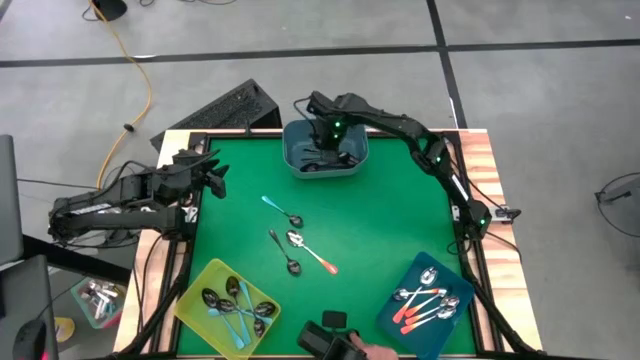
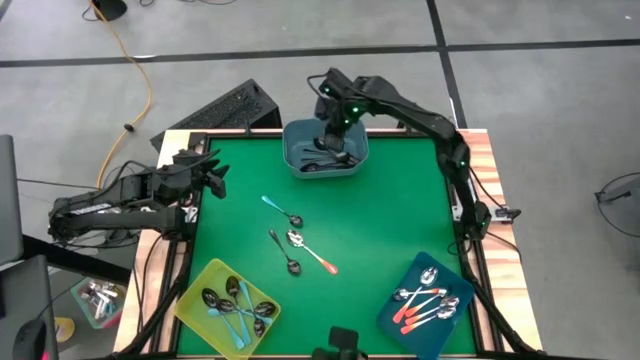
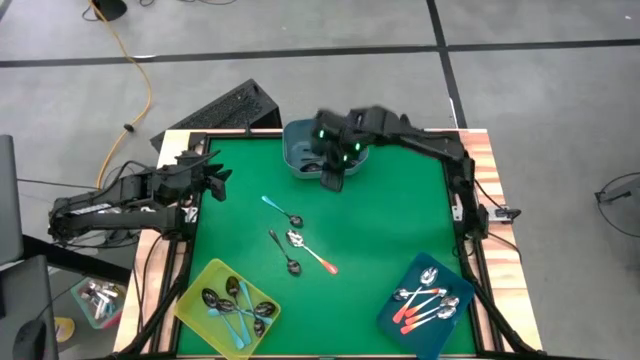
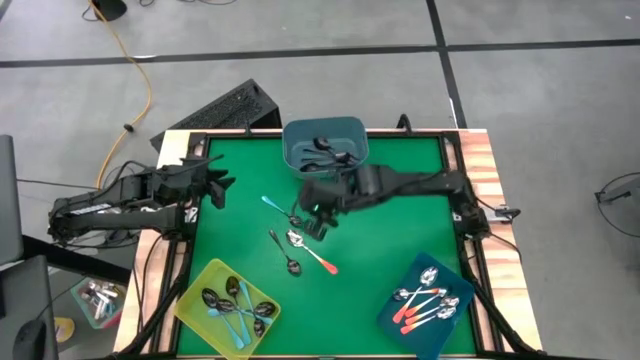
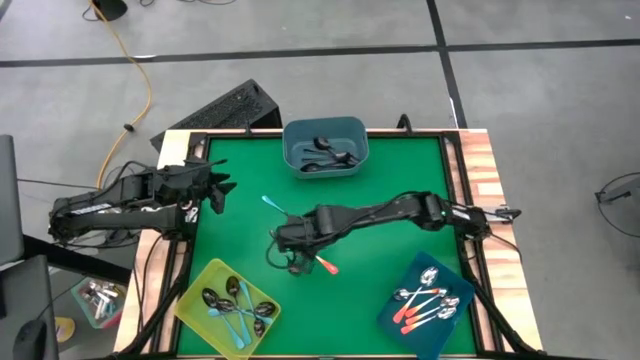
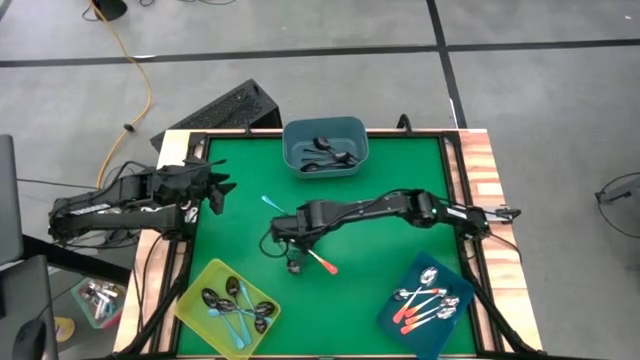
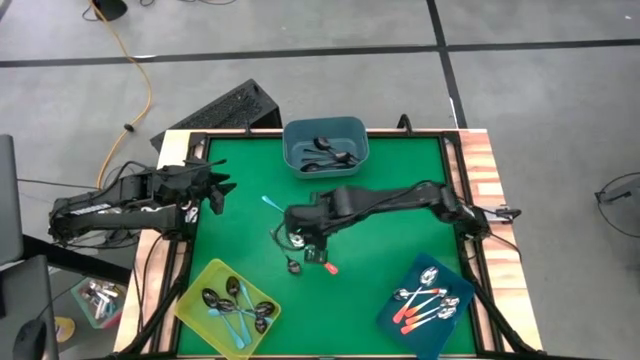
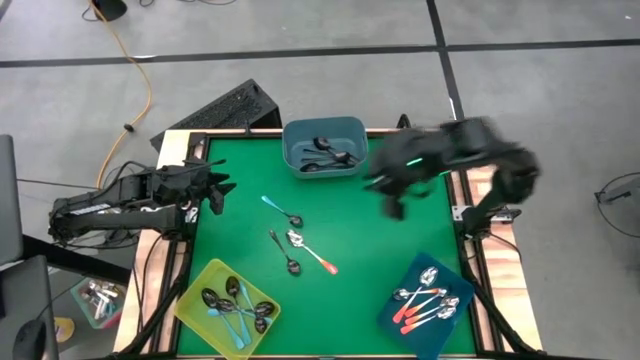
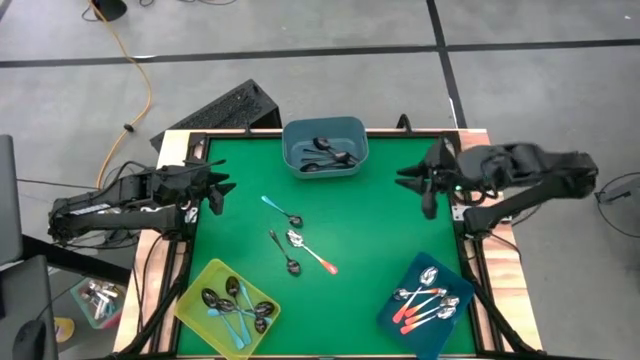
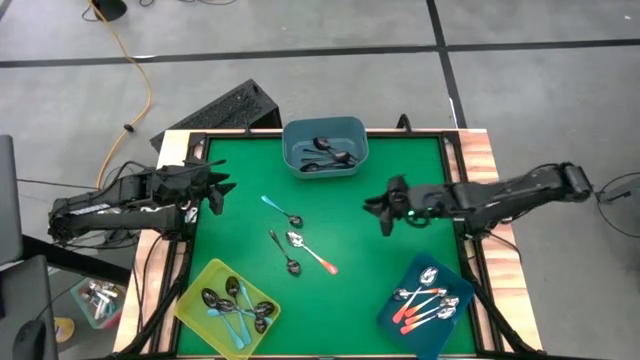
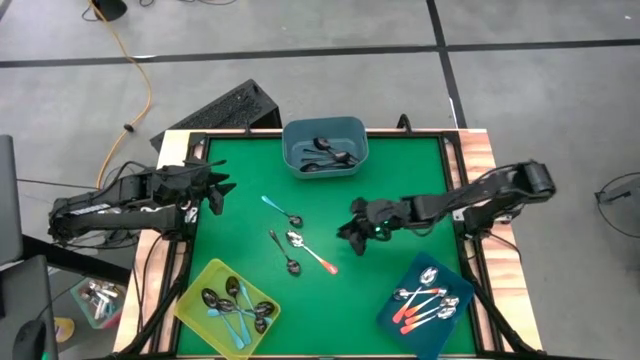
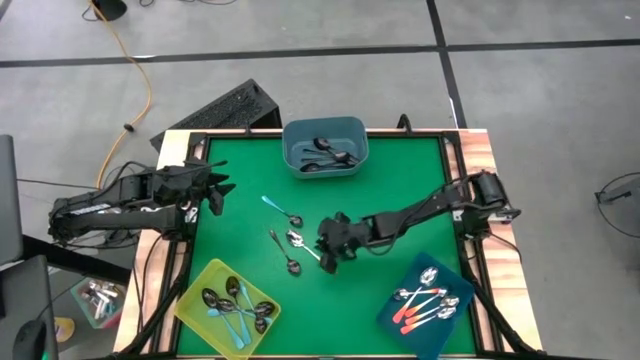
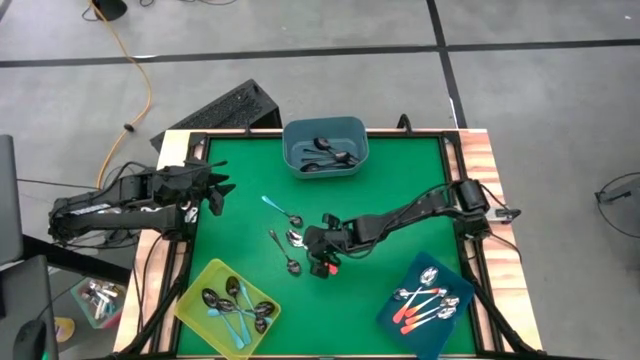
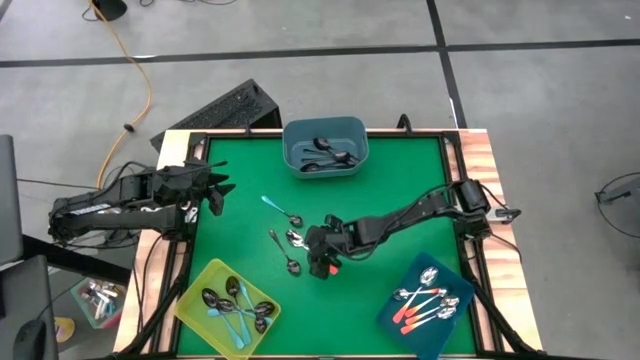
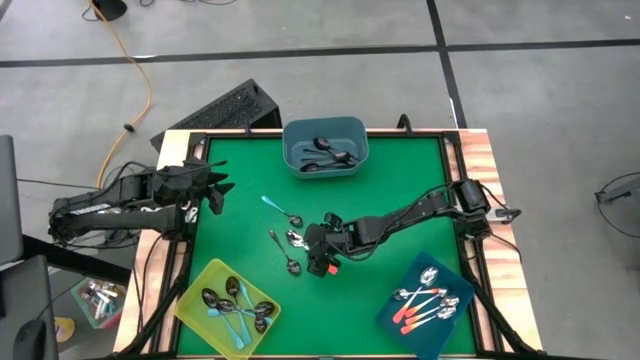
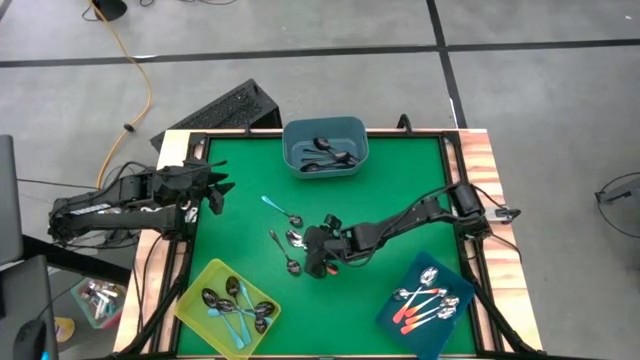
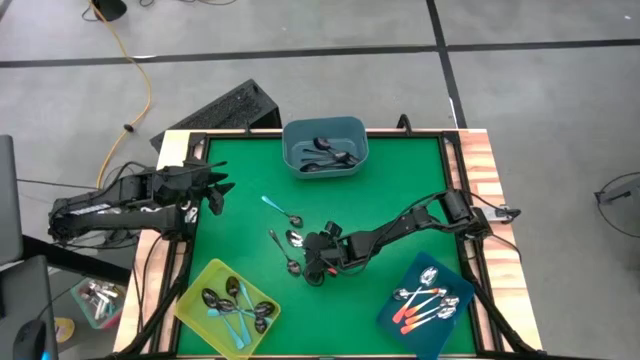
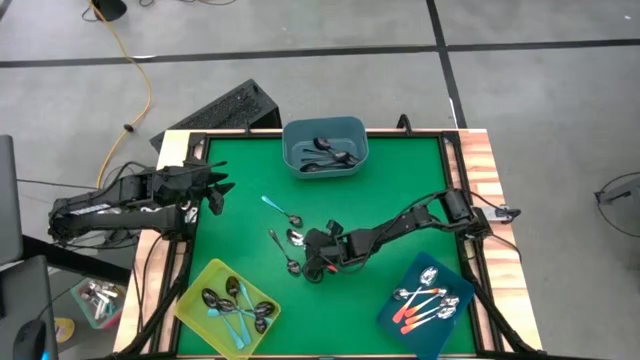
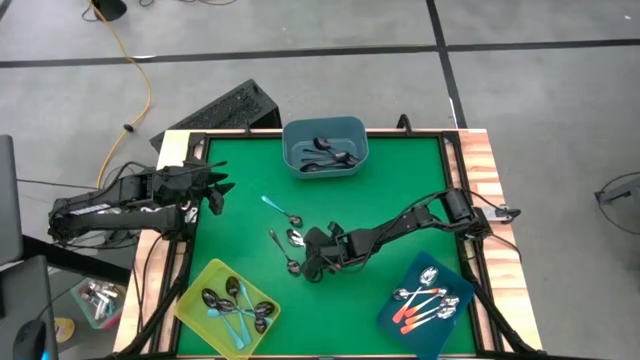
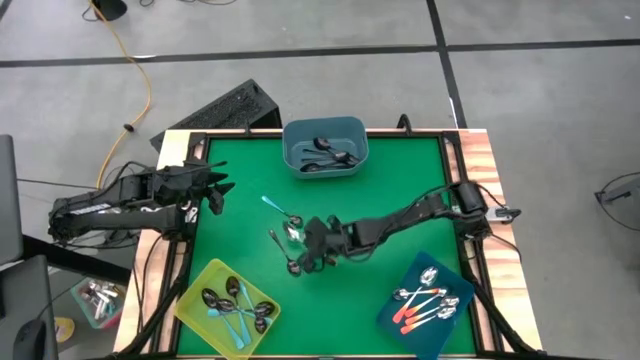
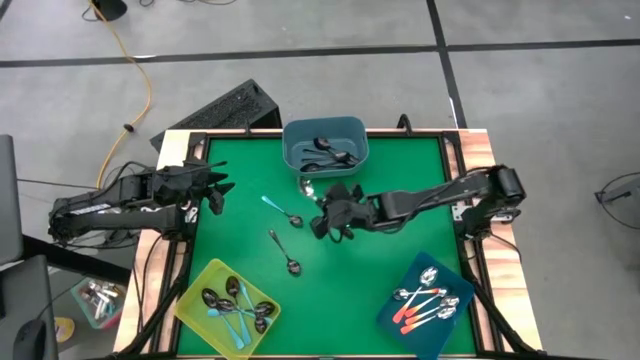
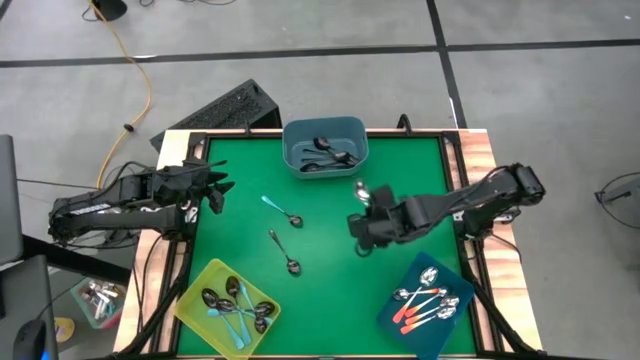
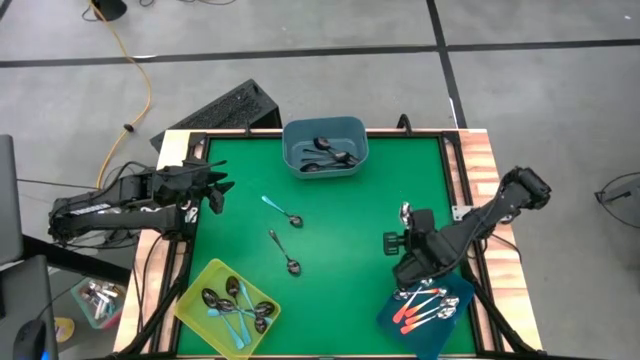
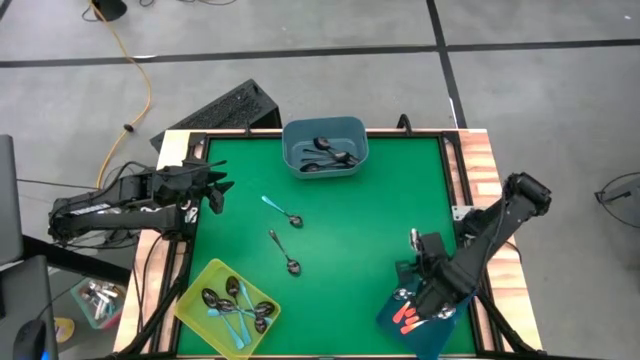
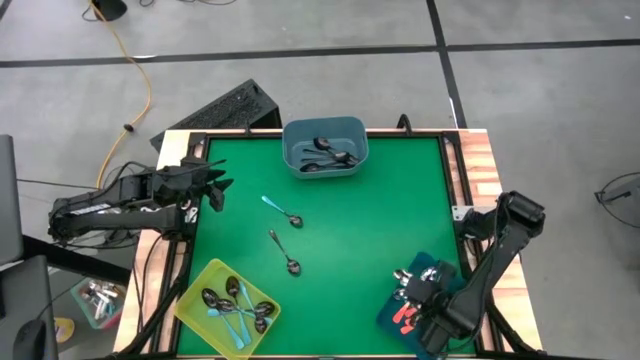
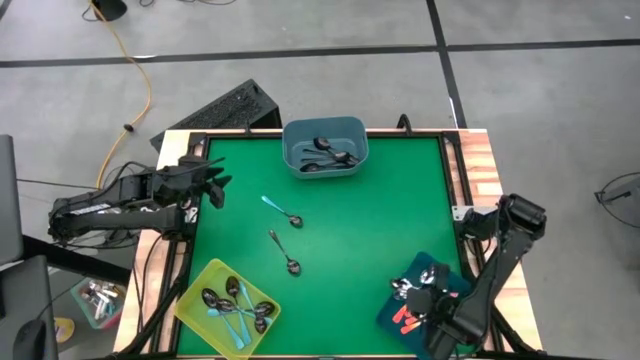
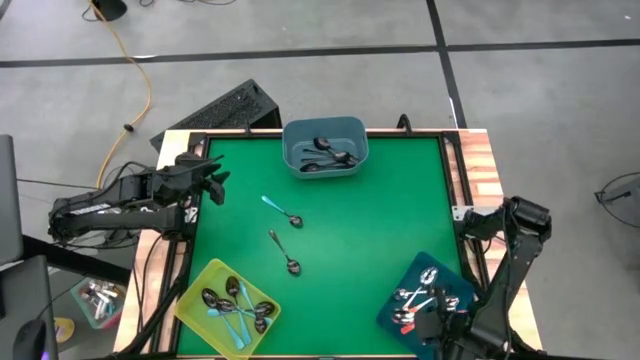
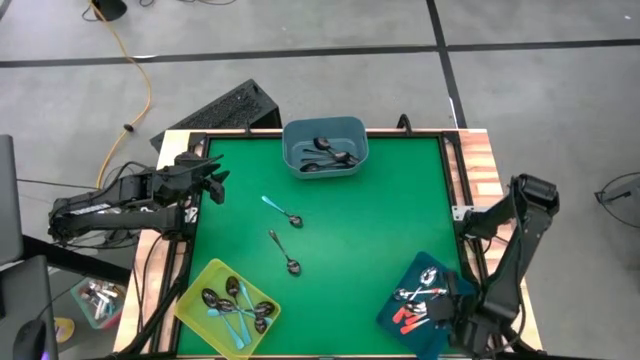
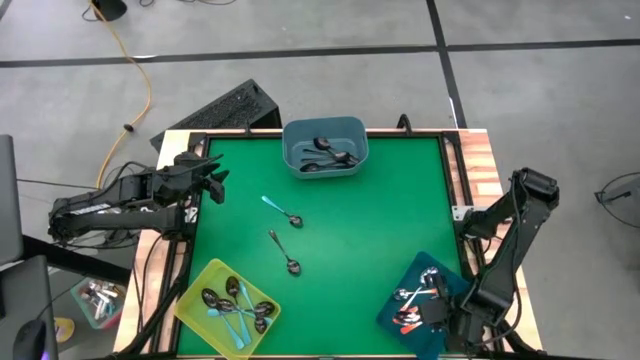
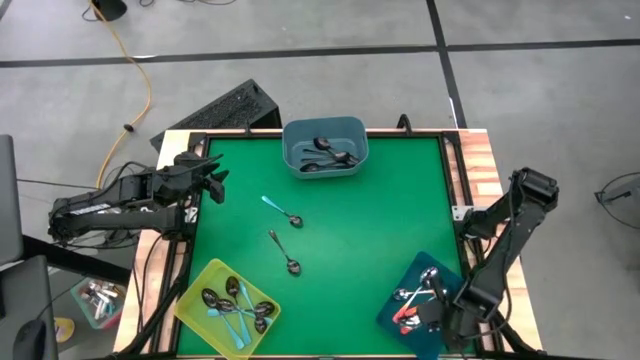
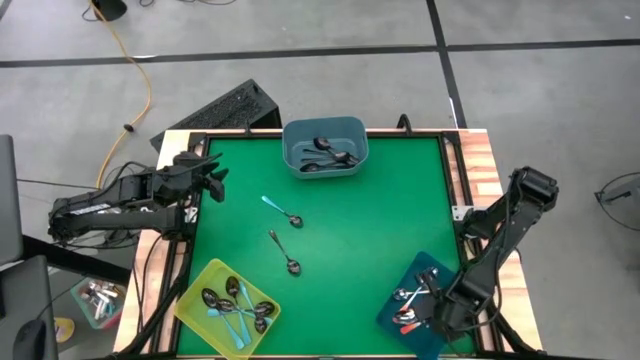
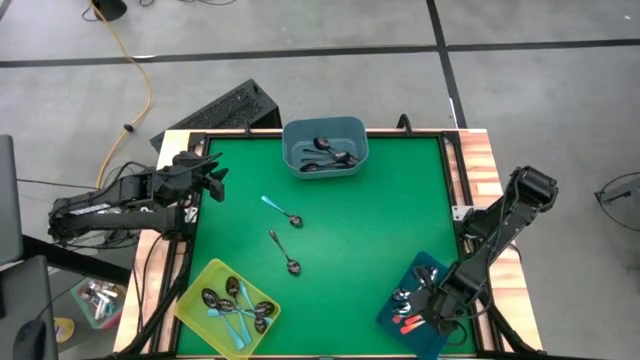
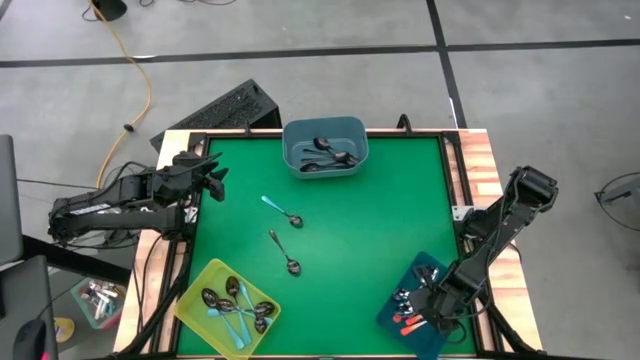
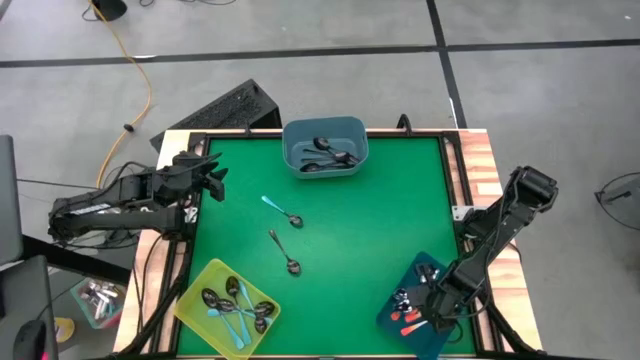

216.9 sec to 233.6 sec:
Task: Sort silverware by color (type)
Put the orange spoon into the blue bin

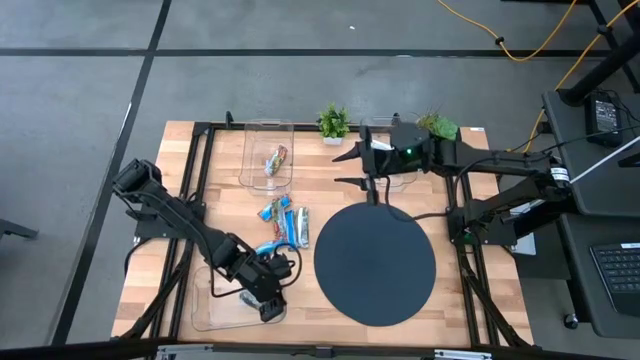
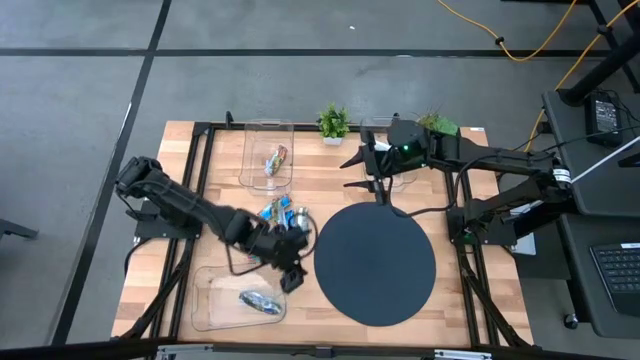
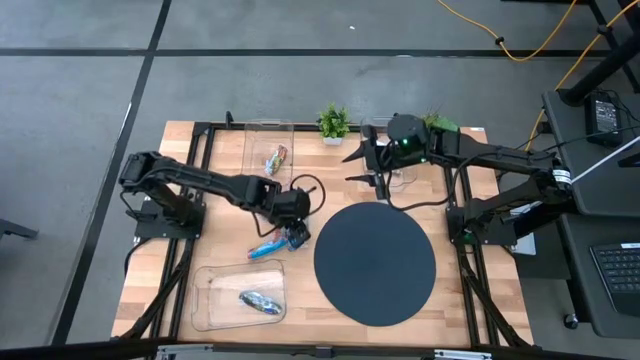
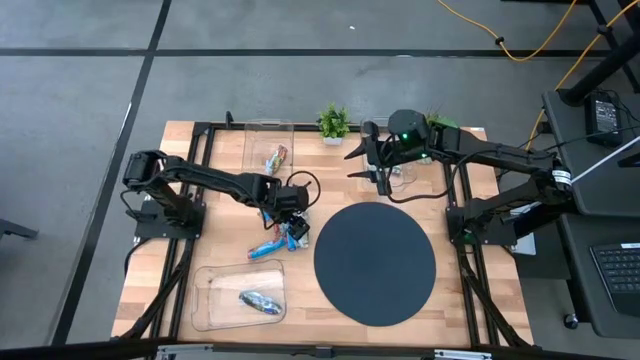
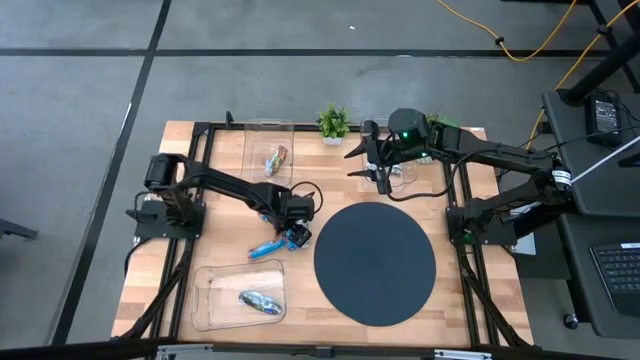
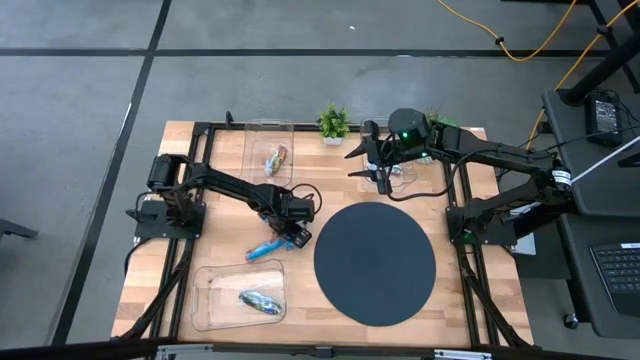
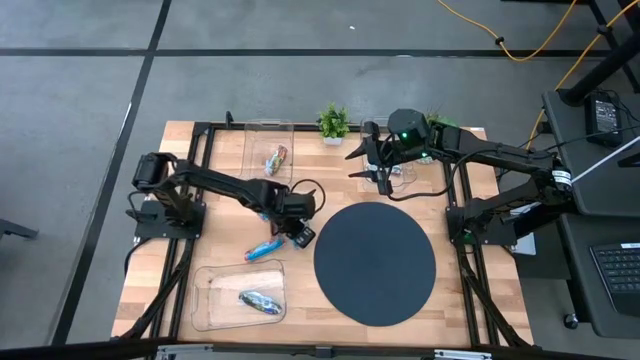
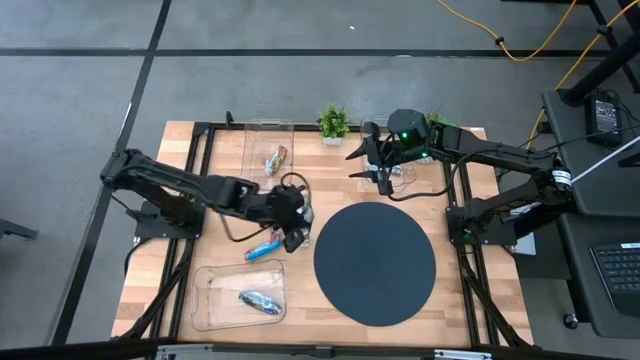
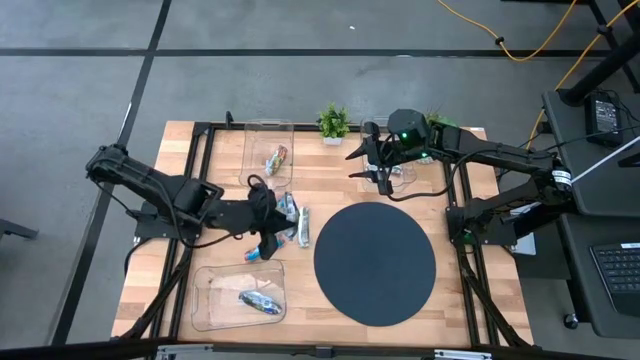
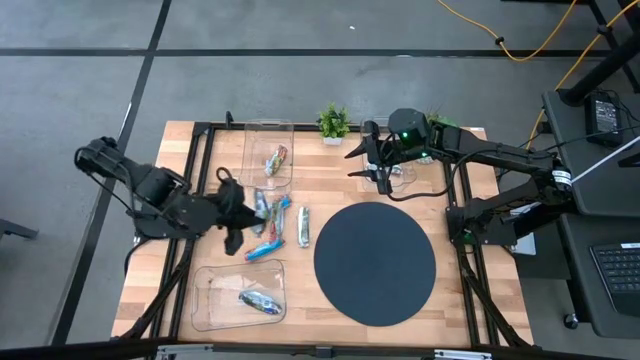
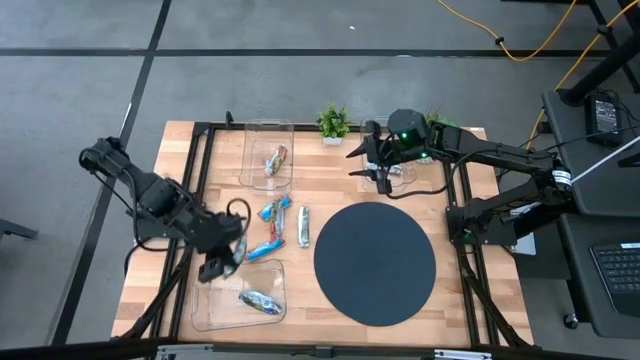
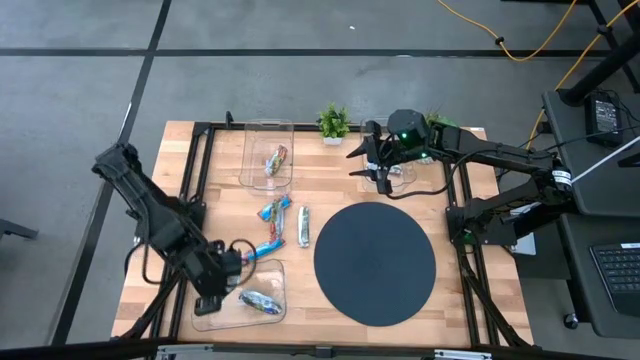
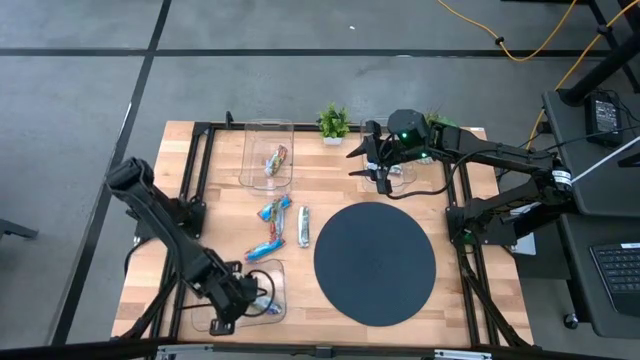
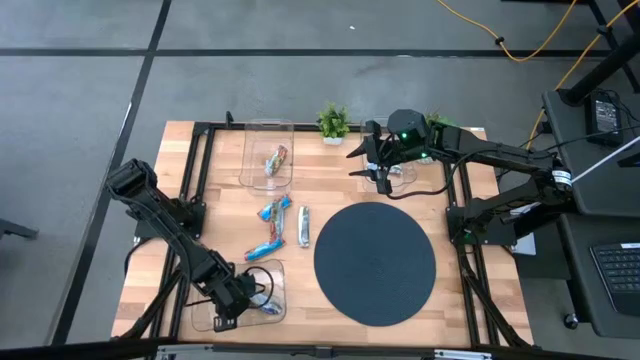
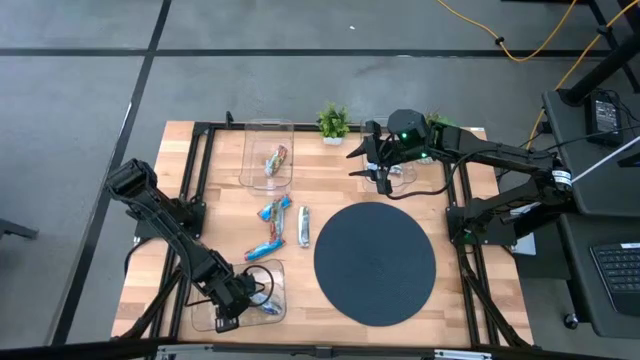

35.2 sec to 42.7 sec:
Task: Pick and place Granola Bars by type
Put the blue granola bar into the bottom transparent bin
